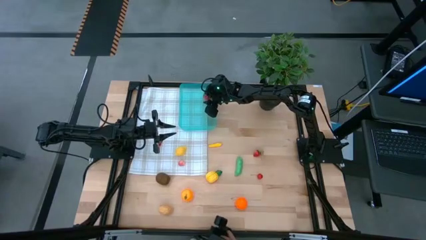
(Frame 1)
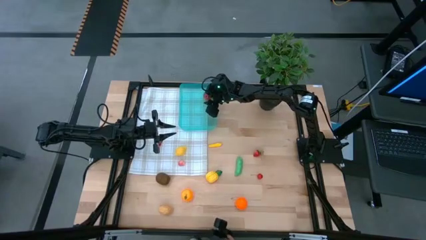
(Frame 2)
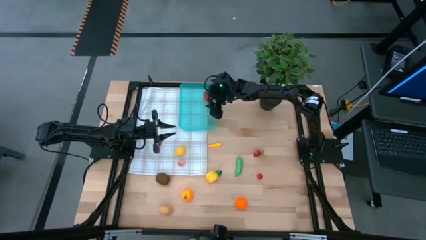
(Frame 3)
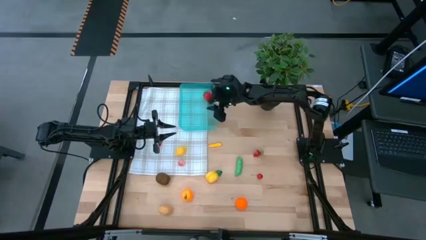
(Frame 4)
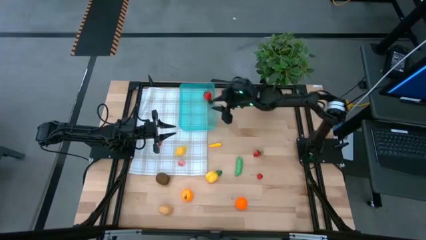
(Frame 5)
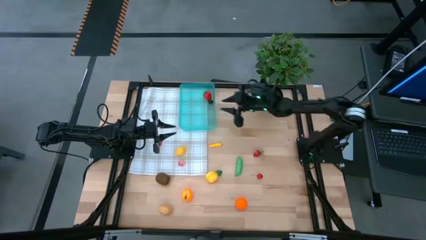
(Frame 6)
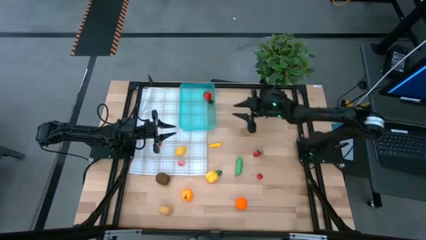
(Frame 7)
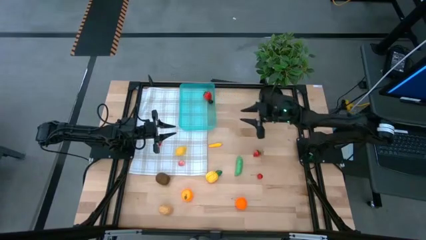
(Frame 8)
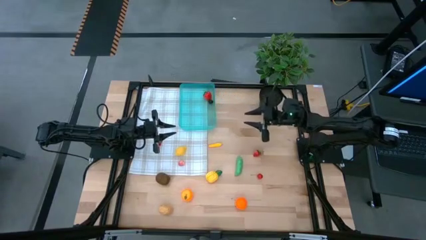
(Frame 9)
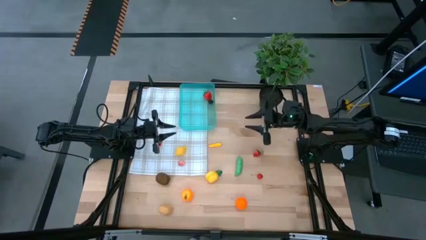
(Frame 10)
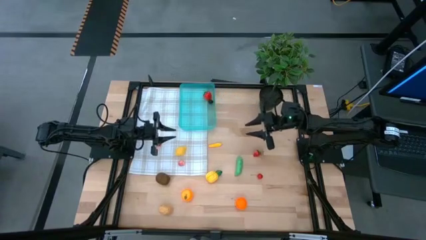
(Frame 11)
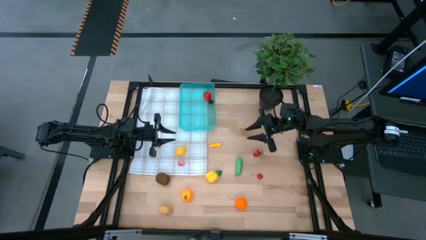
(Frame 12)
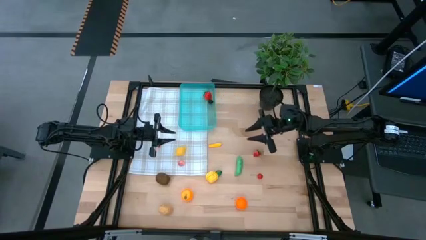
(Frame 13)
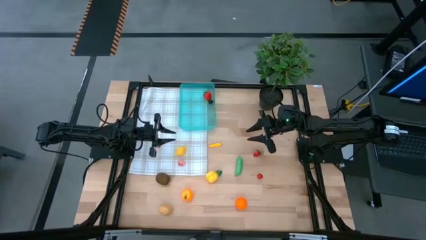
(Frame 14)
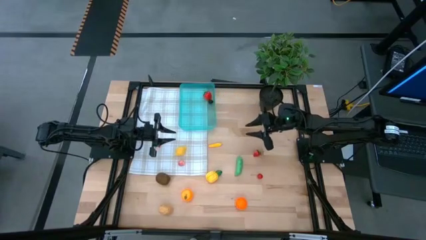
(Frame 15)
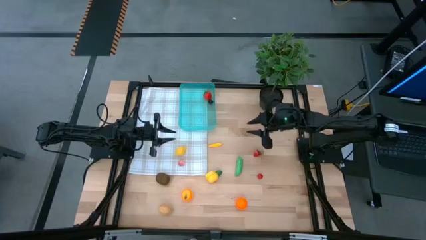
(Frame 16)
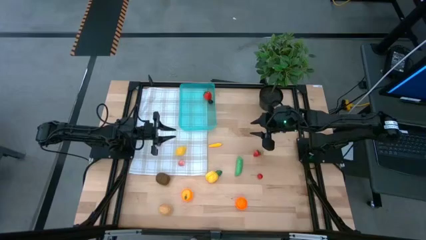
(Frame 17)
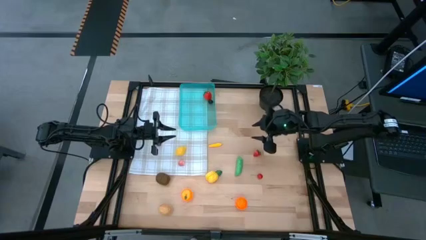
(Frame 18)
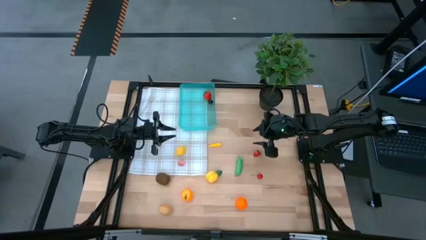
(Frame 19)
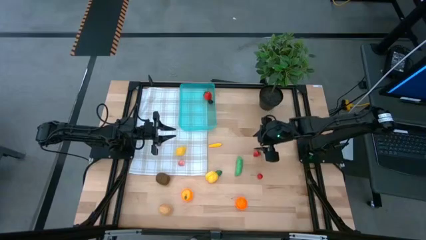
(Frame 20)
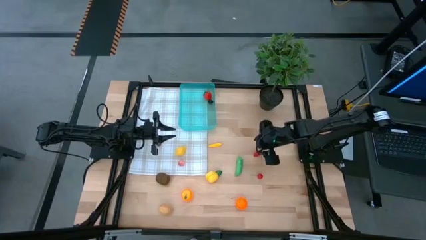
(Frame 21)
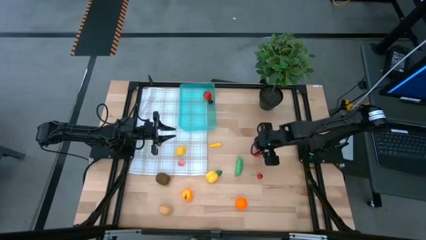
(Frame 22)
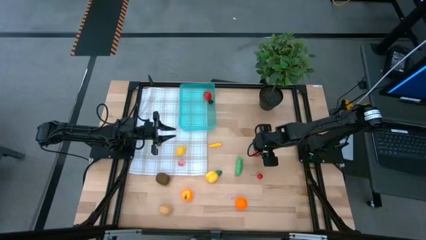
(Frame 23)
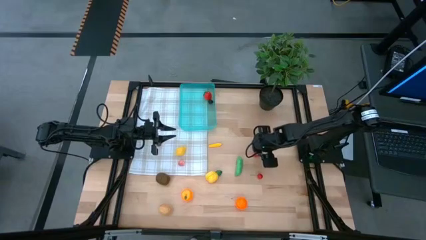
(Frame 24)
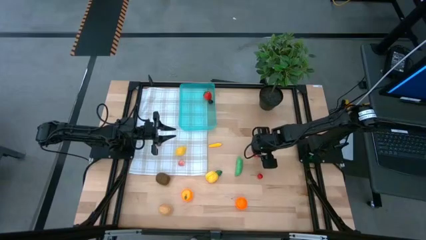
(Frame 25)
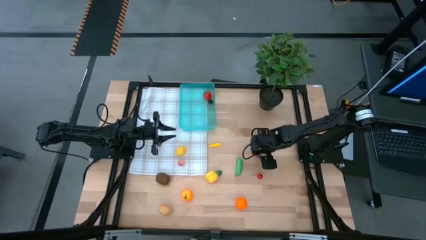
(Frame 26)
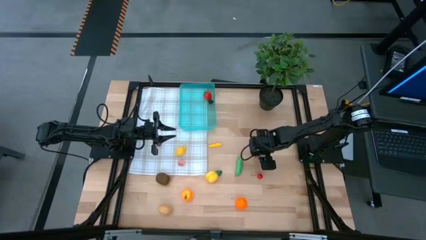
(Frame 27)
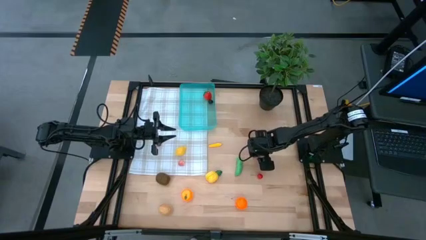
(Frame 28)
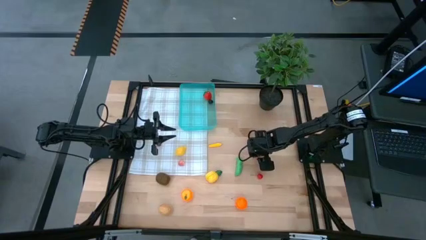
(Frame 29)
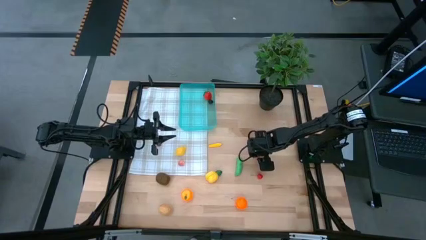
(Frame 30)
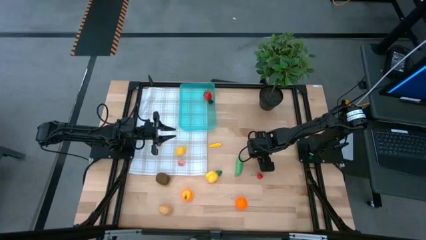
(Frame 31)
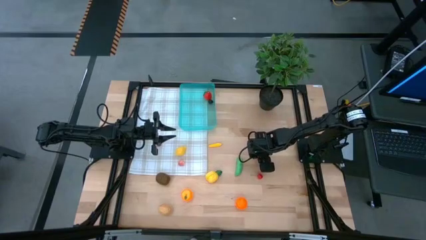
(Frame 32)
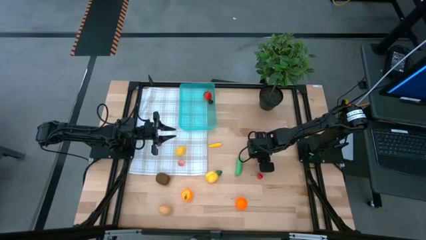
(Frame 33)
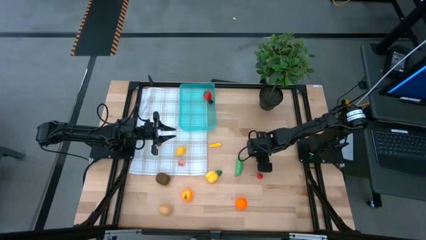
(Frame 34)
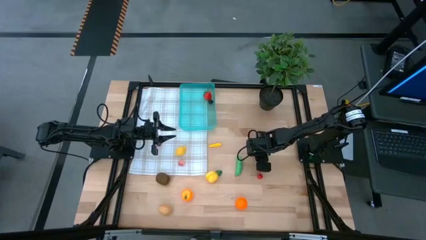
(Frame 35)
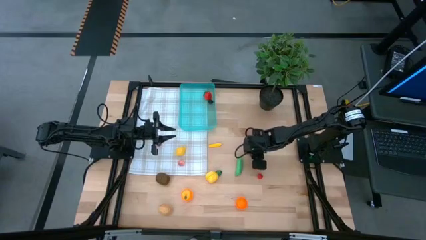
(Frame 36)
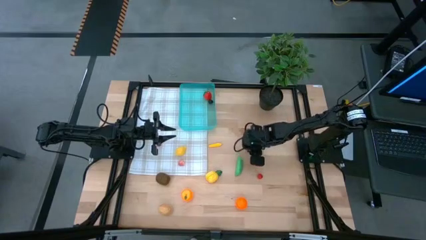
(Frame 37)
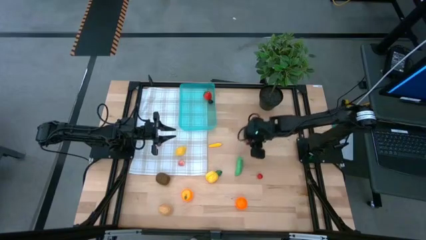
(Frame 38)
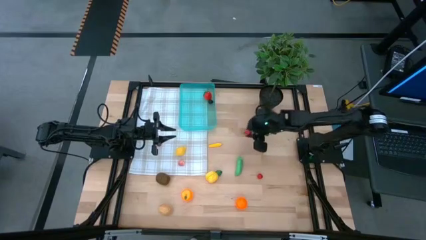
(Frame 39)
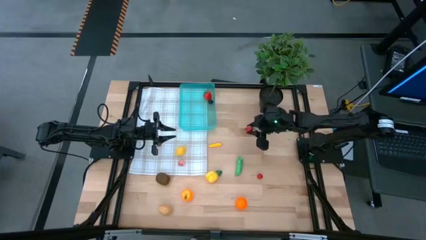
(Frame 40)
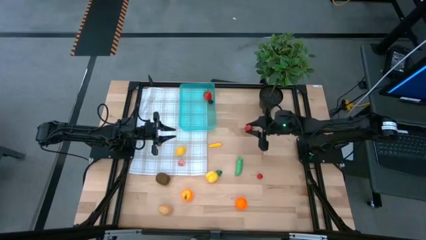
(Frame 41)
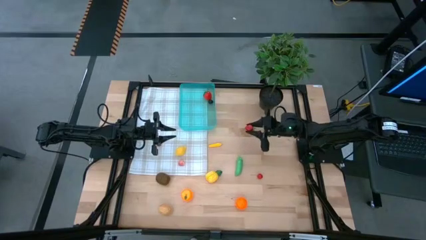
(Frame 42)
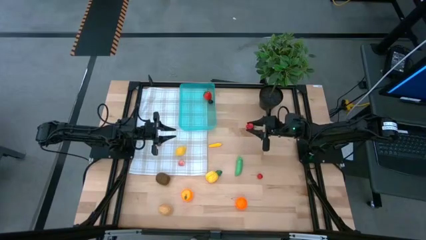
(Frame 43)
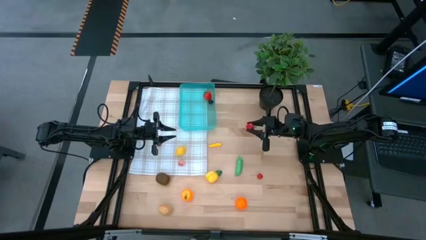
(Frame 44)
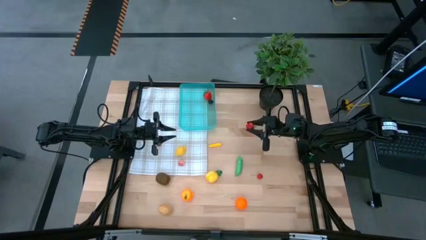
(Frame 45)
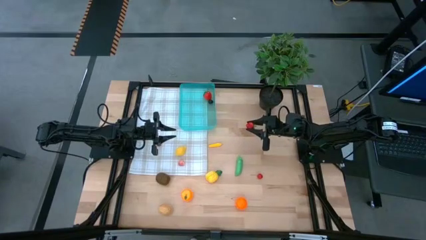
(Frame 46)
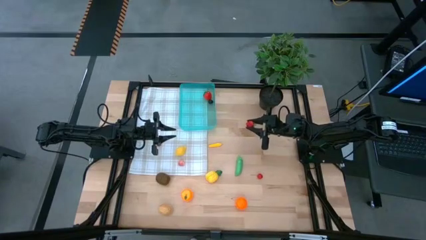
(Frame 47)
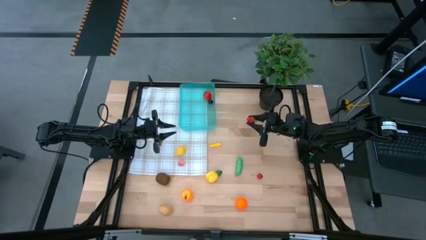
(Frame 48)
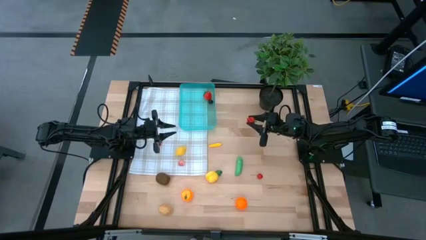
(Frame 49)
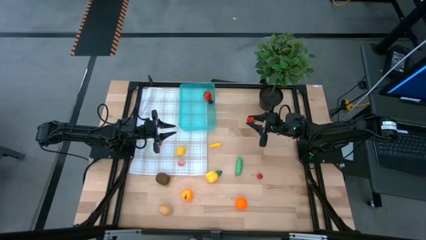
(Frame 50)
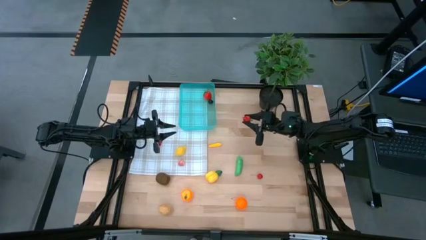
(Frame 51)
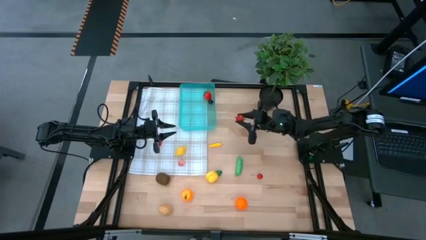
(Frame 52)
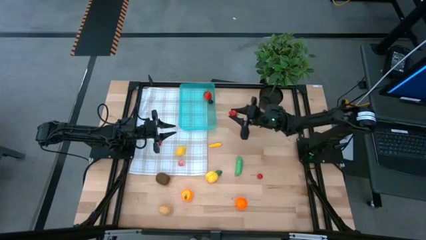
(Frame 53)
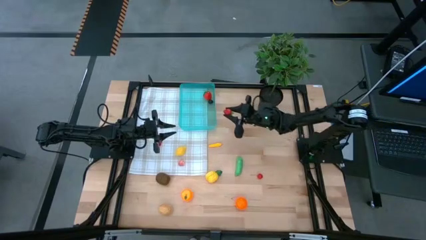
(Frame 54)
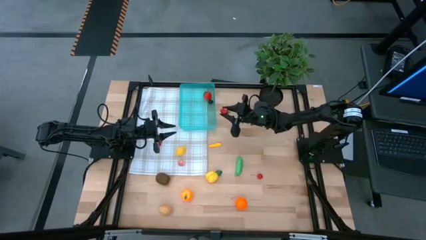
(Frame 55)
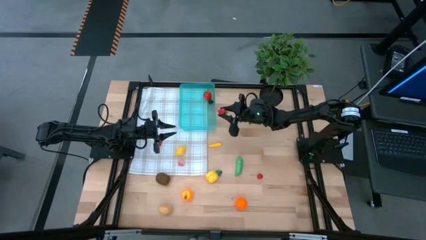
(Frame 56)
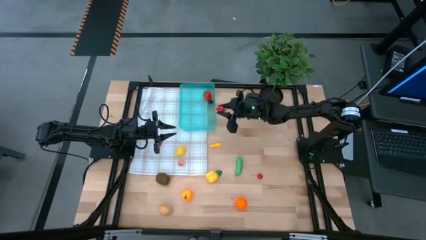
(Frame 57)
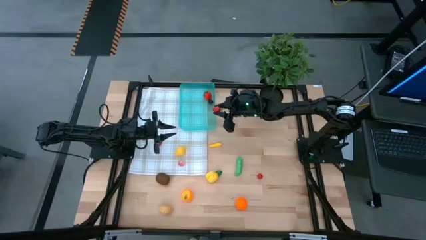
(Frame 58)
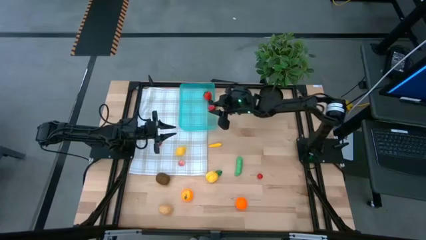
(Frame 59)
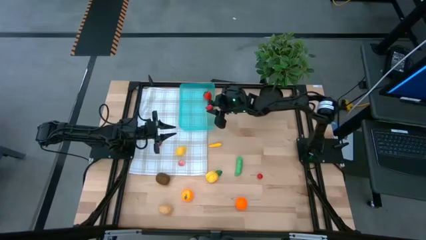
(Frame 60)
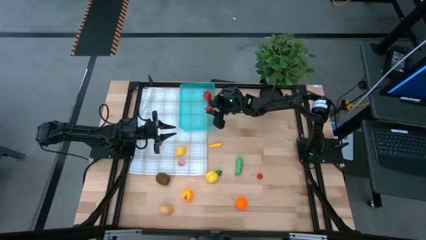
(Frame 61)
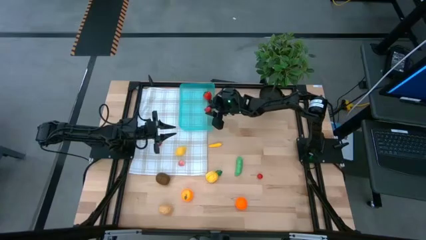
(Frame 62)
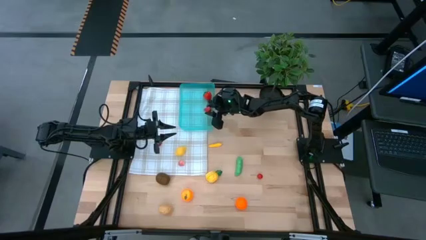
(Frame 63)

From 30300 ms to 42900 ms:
Task: Pick and placing Produce into tupperware
Put the red strawberry into the blue bin

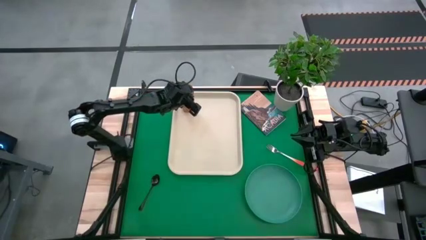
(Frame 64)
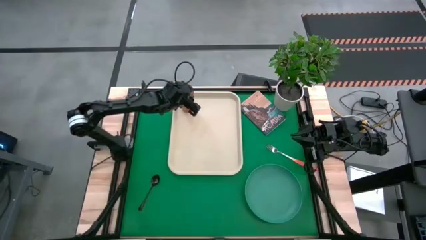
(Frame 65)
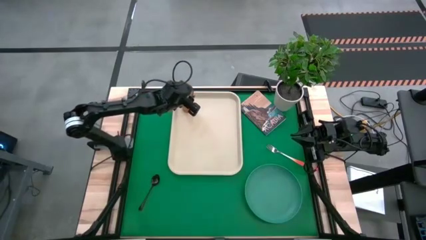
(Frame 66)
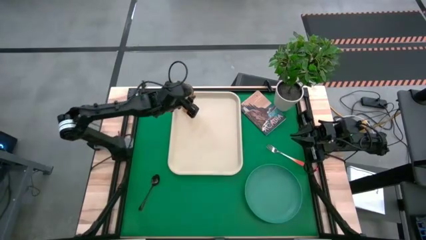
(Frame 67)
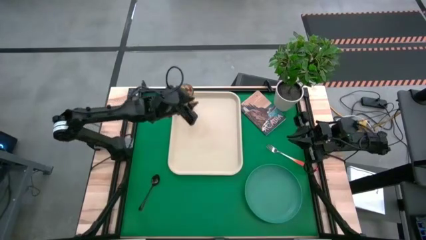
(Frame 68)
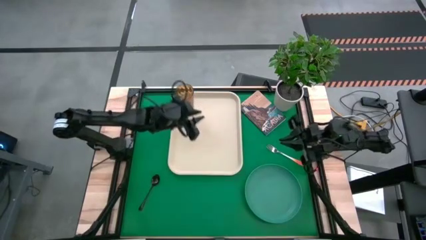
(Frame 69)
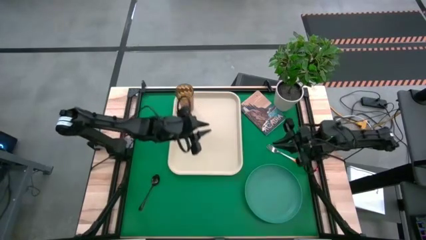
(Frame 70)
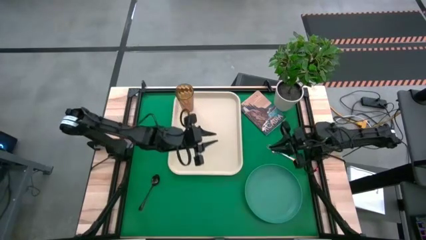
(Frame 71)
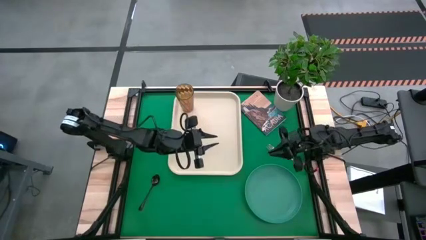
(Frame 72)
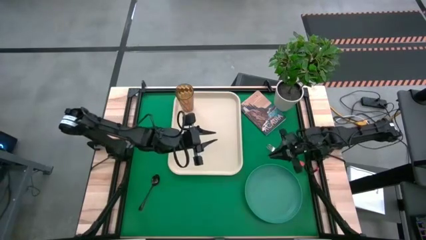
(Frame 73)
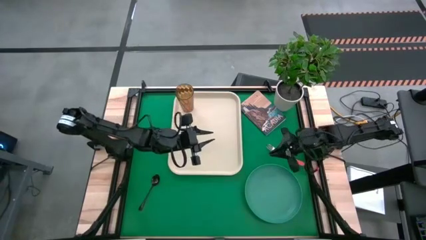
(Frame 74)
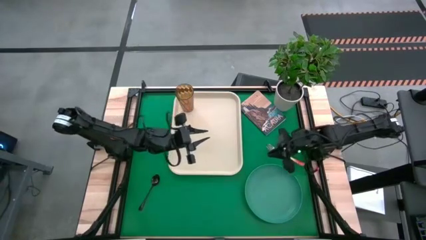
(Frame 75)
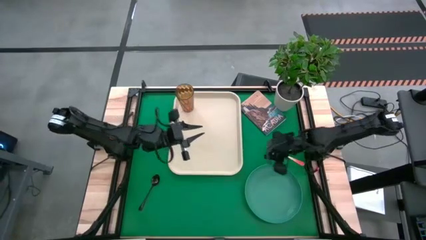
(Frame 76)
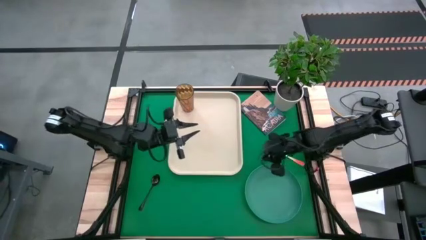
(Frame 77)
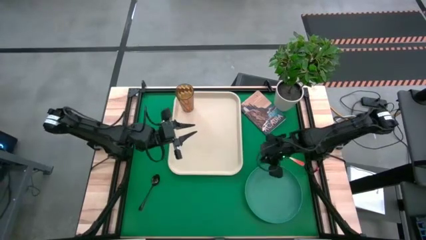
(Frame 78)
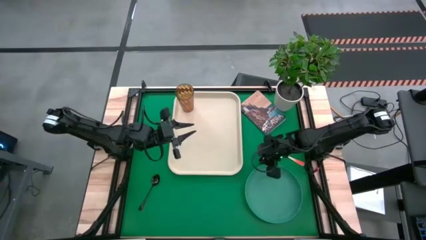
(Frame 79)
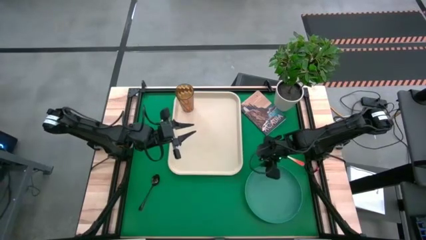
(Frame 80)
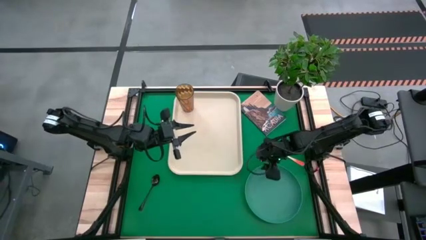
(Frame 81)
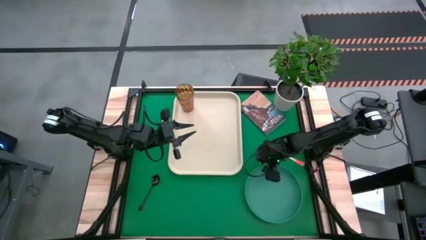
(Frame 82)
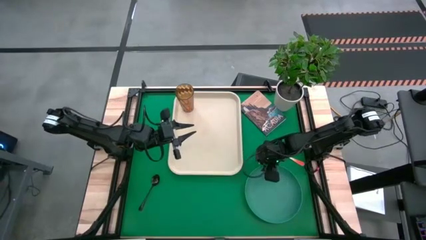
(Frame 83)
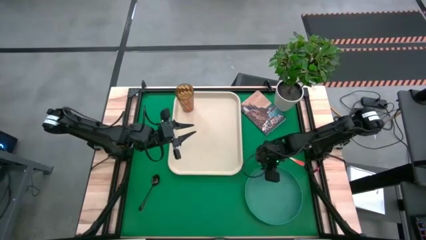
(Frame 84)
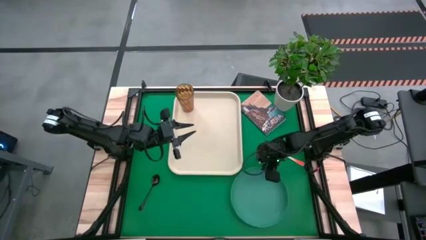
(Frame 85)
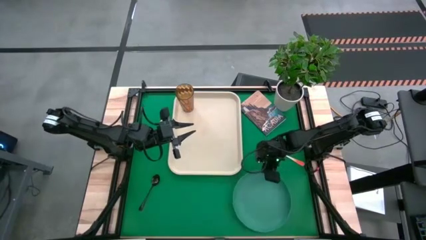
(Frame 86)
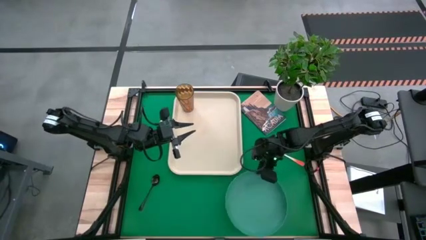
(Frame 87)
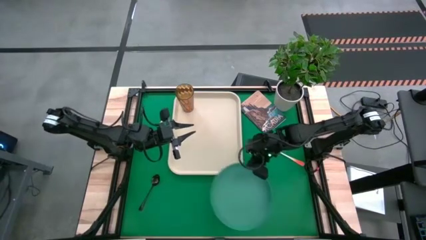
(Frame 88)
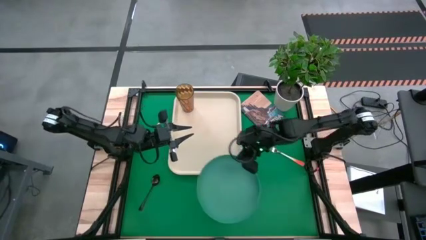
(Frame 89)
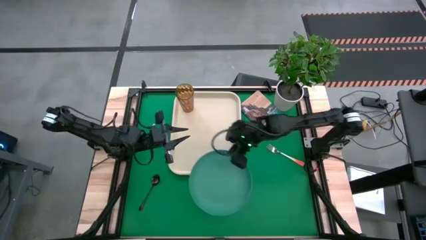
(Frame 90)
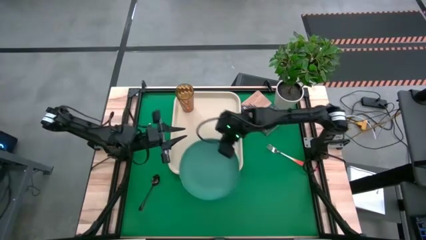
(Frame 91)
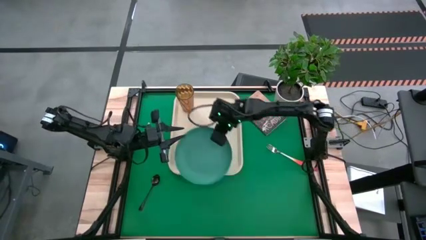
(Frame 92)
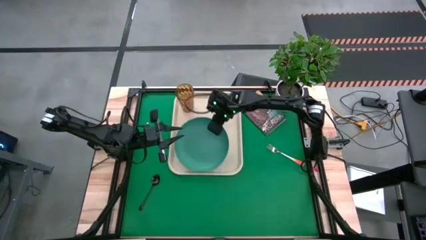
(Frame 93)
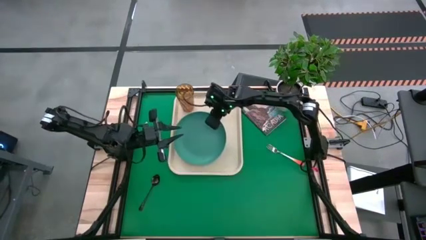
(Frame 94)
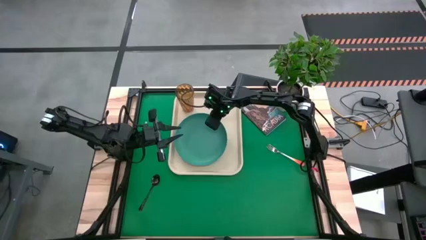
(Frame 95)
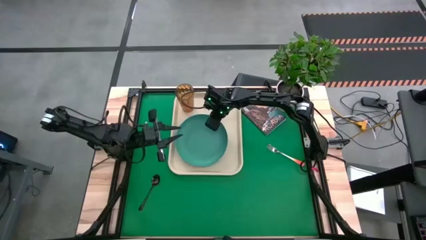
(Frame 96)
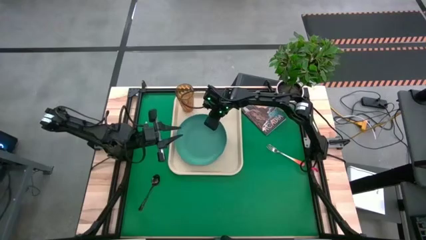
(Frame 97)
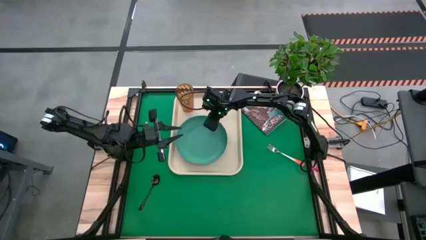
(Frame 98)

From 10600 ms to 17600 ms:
Task: Pick and place plate/cup/fork/spoon on tray
Put the green plate on the white tray to the bottom of the orange cup
